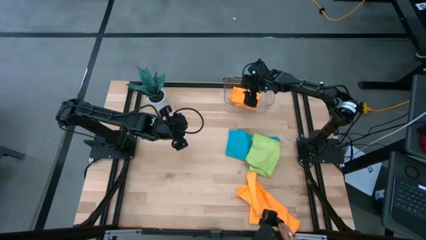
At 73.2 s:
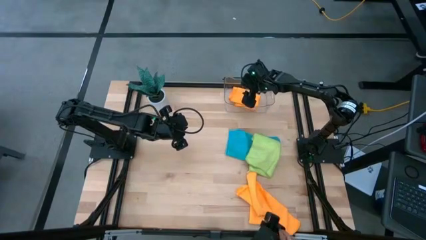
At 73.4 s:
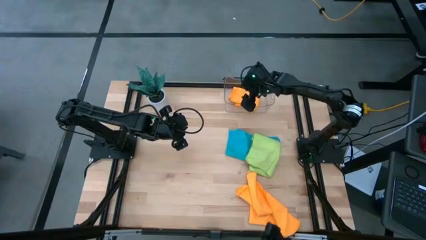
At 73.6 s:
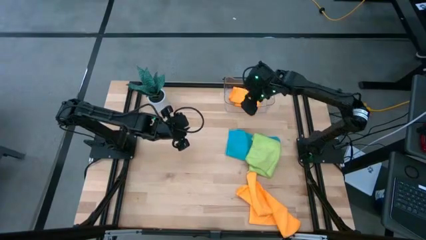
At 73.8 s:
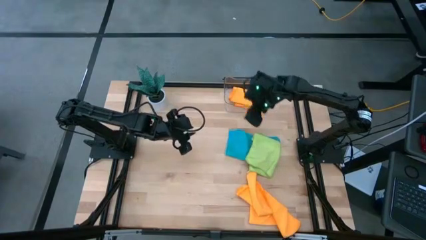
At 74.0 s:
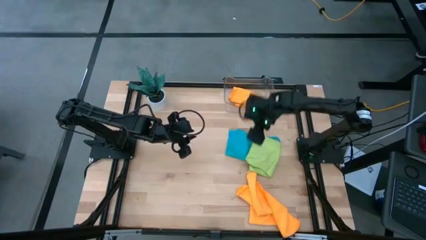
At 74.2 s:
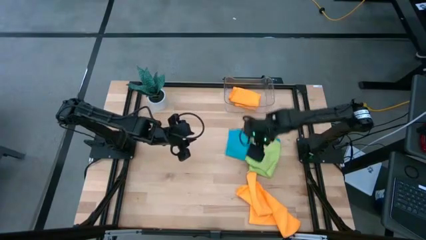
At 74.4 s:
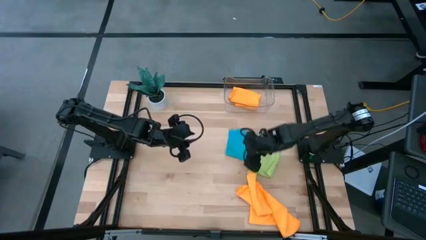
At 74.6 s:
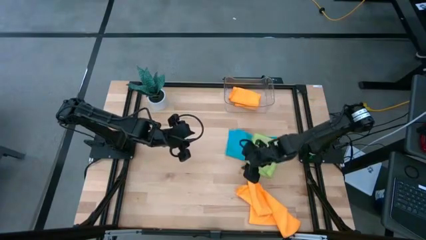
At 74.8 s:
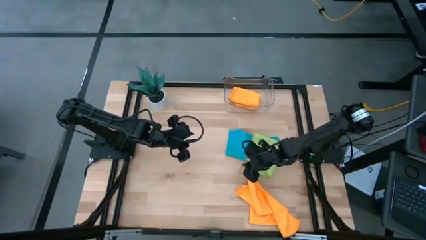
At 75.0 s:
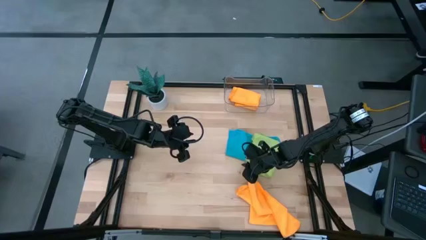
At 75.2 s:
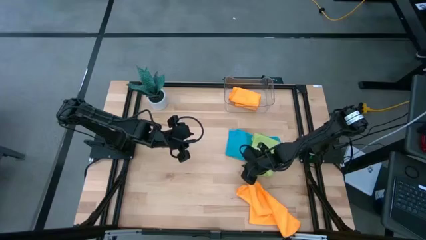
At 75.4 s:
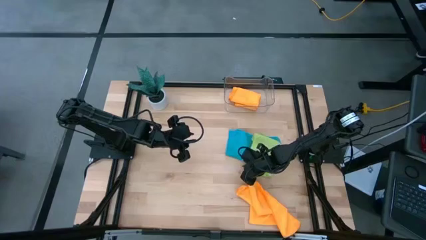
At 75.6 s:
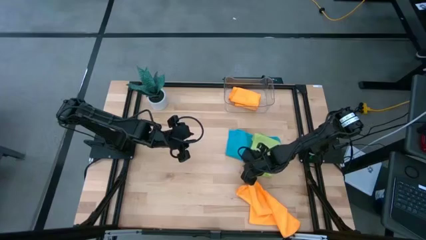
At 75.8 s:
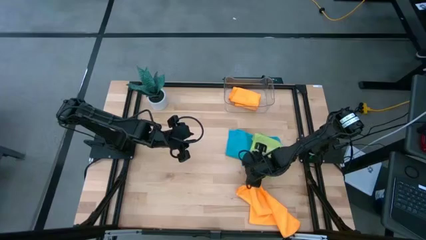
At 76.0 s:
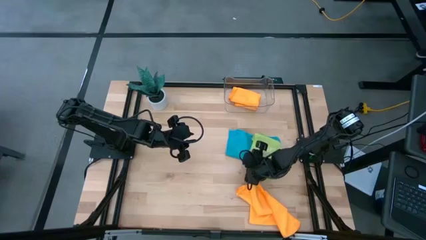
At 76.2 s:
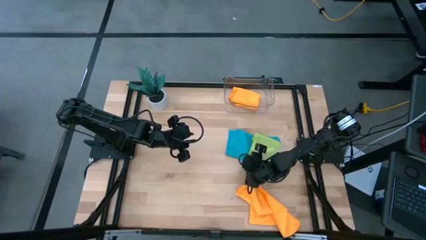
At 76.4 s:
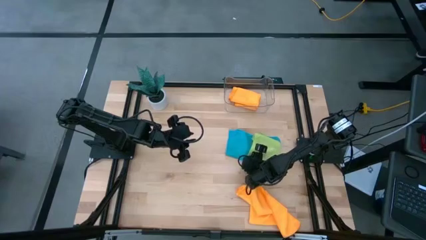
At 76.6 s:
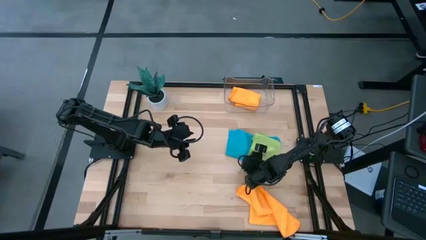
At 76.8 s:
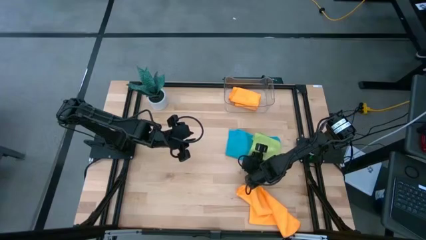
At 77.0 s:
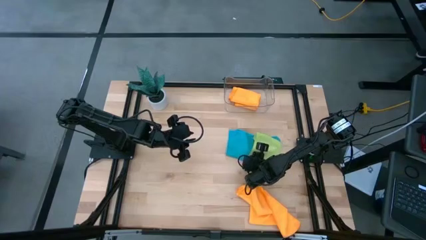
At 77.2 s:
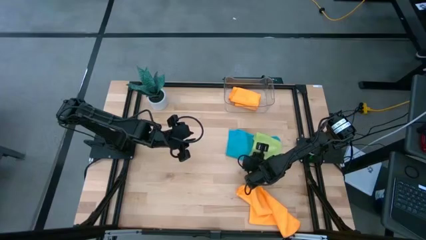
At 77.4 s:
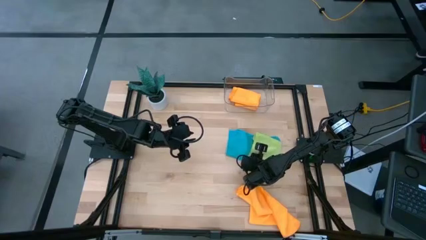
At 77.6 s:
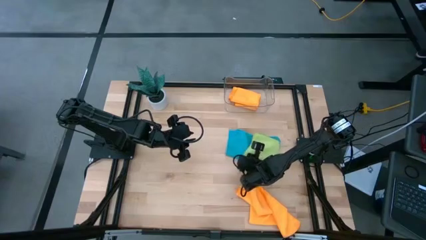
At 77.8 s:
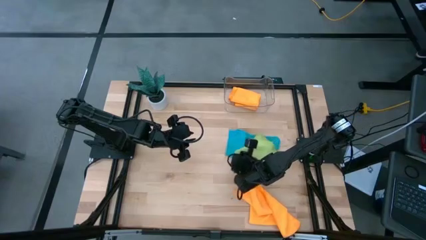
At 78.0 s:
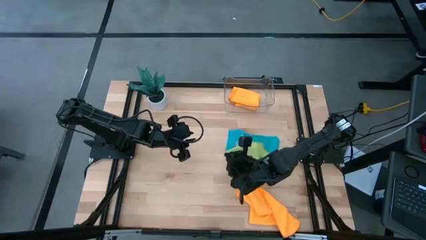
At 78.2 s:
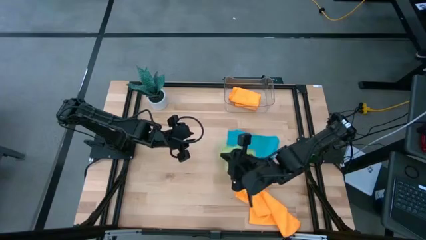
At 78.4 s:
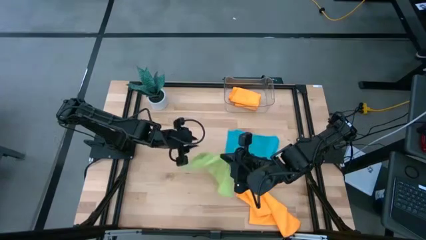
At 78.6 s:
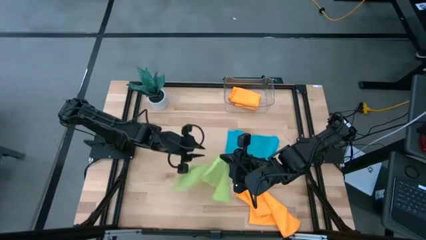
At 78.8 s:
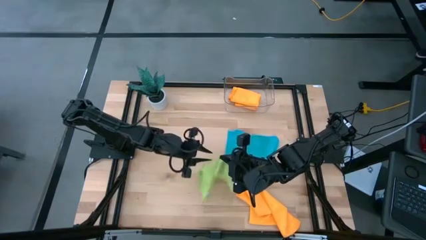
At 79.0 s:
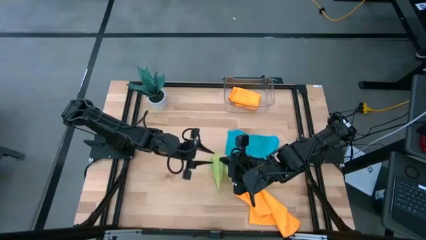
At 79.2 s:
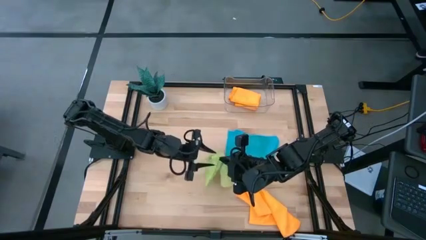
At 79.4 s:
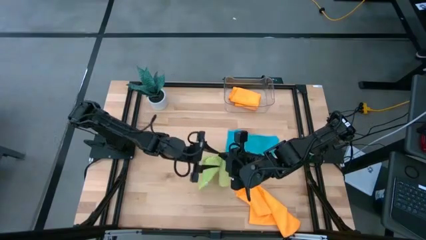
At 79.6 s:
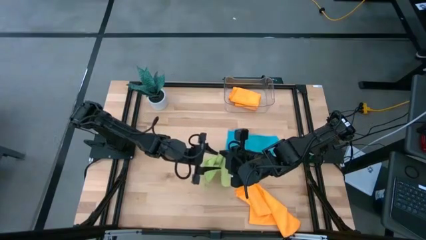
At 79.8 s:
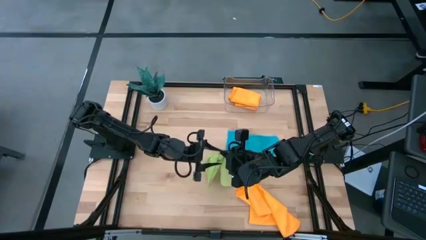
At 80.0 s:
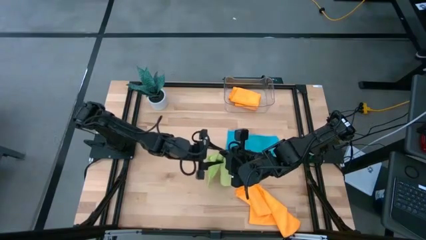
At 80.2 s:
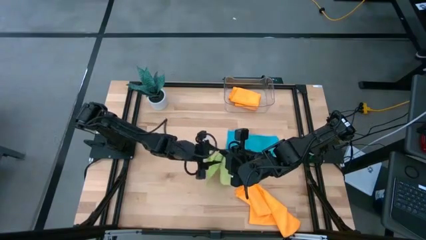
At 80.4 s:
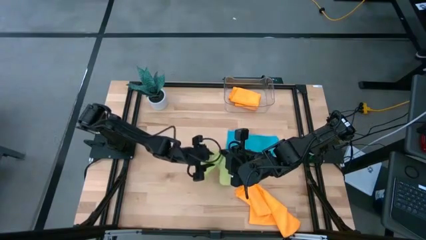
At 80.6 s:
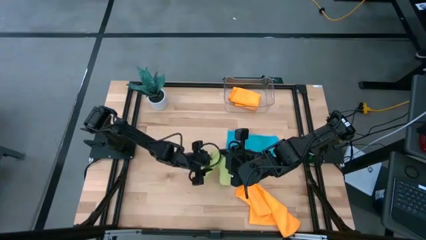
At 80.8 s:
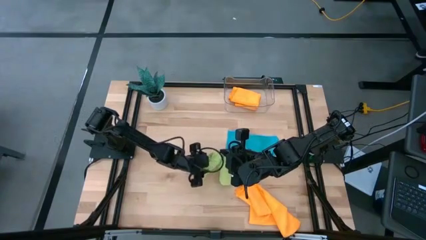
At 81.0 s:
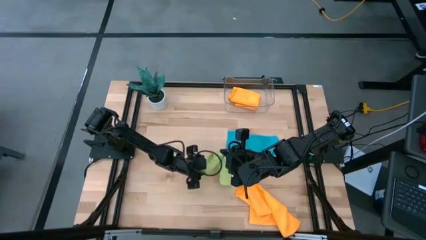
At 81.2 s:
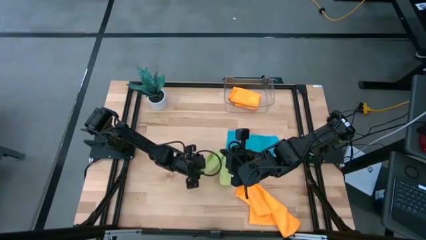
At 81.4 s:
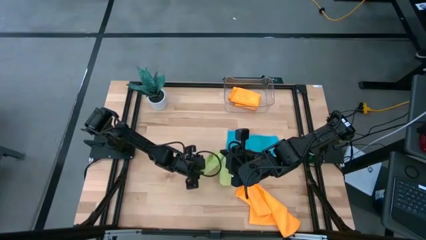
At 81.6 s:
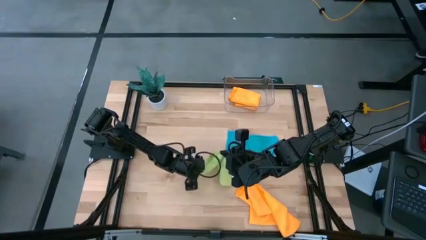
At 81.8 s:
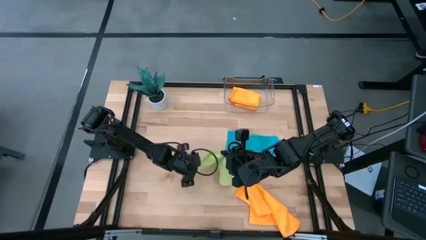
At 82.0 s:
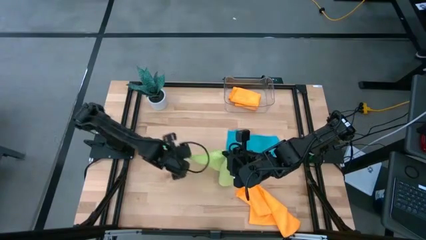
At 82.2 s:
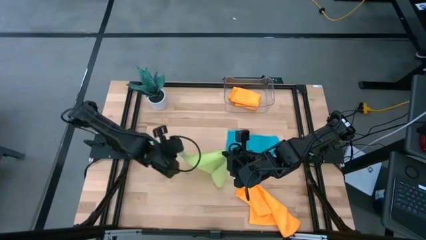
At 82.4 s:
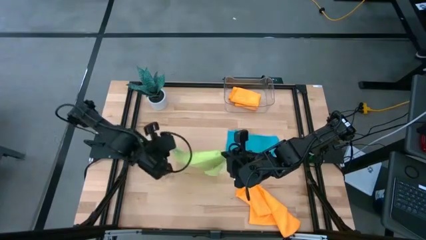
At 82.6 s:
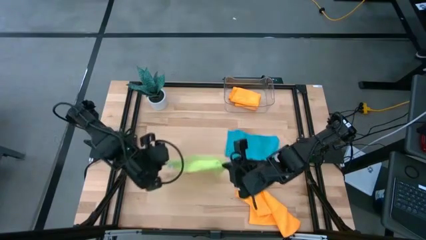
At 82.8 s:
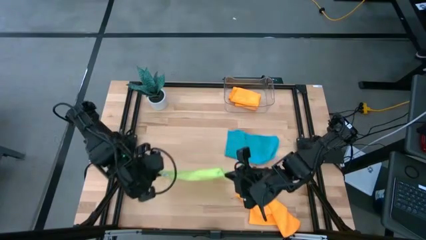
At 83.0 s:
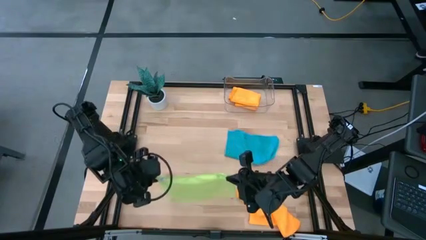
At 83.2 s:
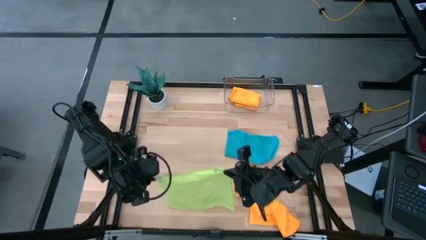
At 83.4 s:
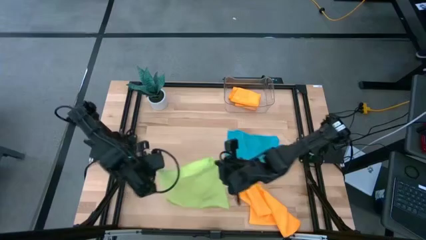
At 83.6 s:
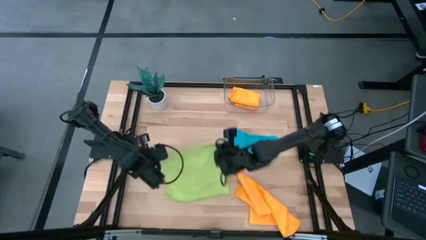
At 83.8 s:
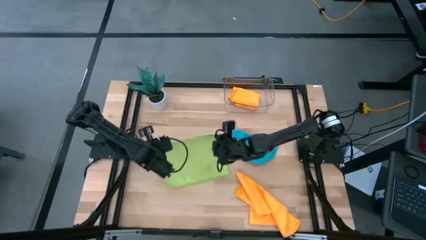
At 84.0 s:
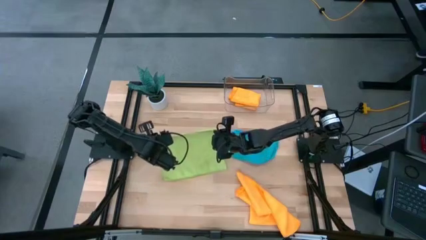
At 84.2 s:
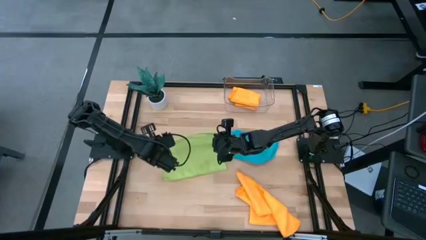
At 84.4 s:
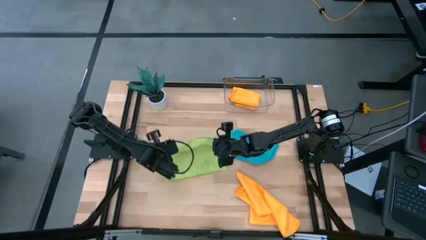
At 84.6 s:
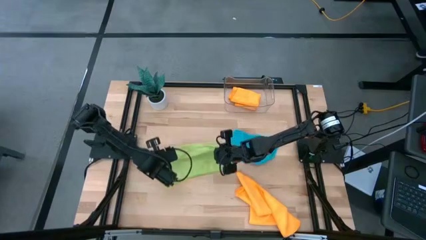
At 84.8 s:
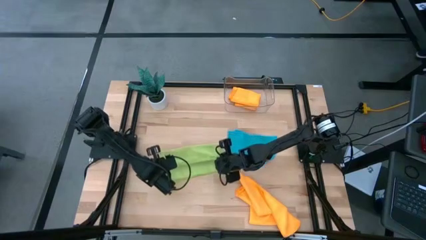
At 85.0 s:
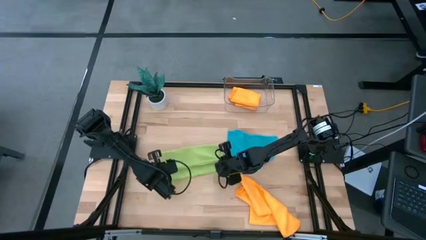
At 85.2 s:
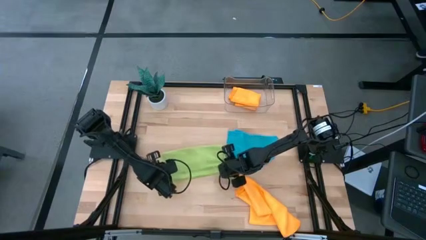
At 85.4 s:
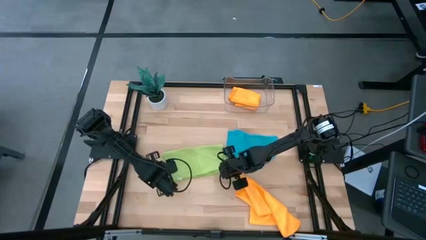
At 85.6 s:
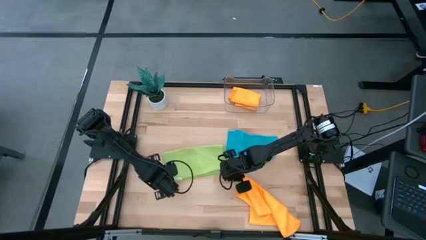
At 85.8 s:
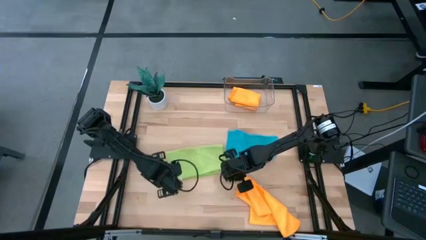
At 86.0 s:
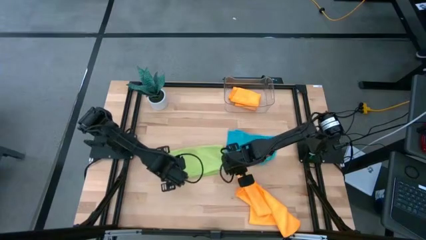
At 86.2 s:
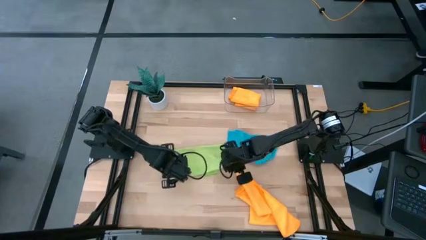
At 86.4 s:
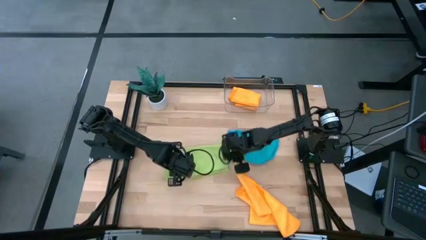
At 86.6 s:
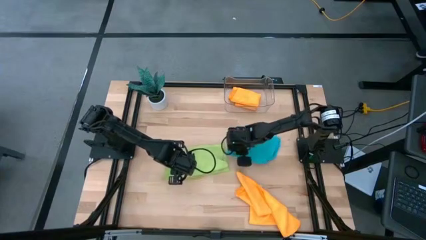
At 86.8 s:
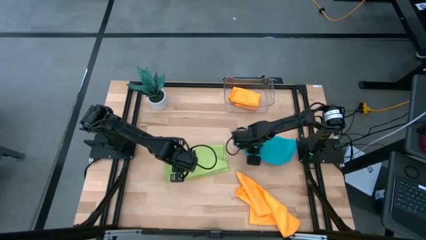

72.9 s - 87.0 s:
Task: Fold microfiber towels
Fold the green microfiber towel
